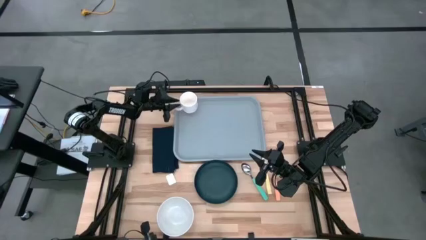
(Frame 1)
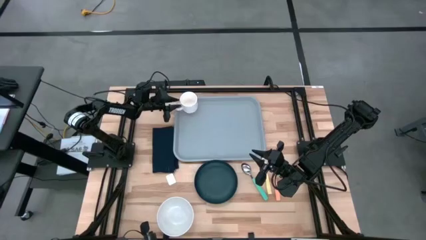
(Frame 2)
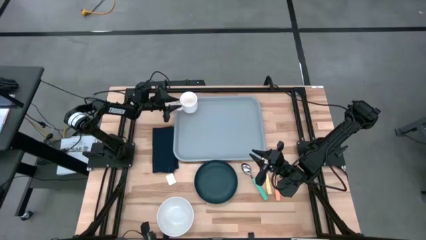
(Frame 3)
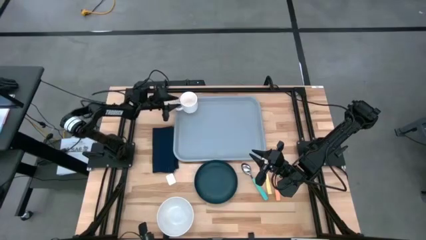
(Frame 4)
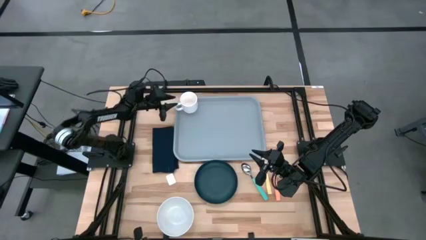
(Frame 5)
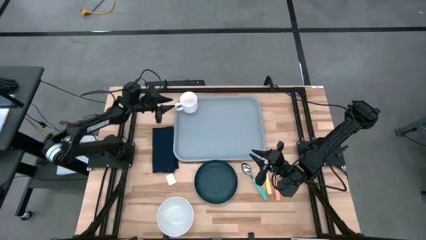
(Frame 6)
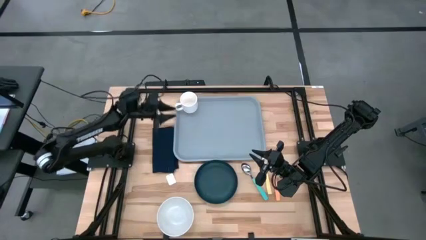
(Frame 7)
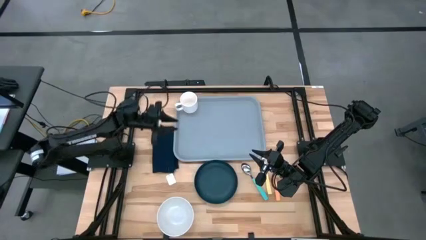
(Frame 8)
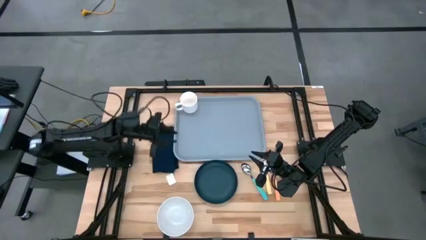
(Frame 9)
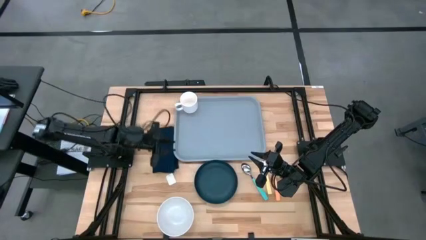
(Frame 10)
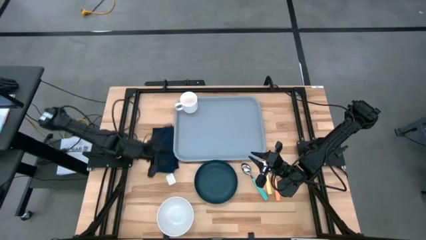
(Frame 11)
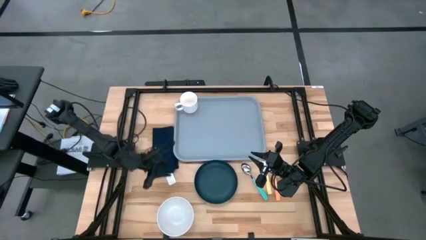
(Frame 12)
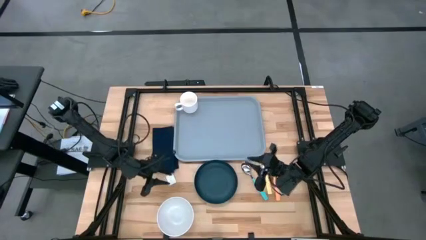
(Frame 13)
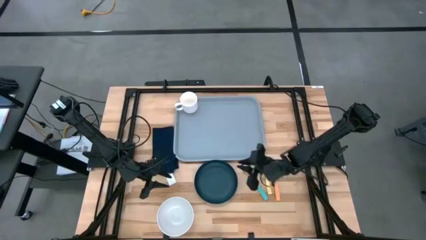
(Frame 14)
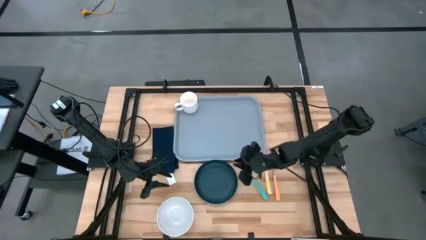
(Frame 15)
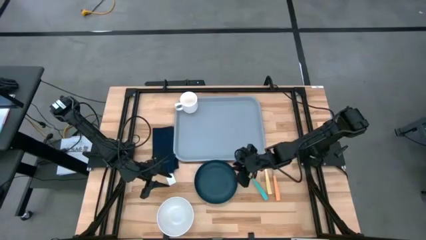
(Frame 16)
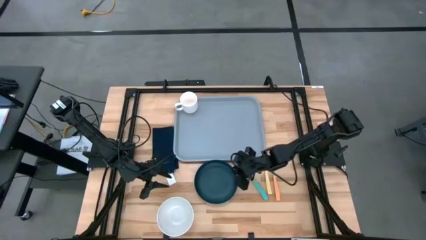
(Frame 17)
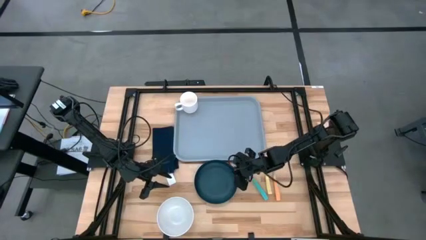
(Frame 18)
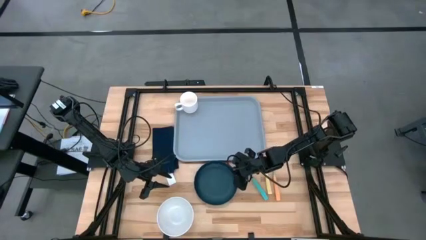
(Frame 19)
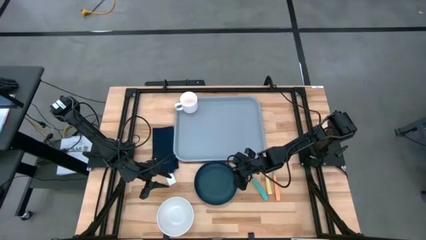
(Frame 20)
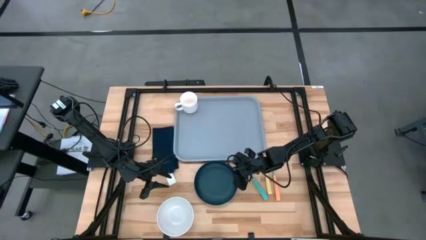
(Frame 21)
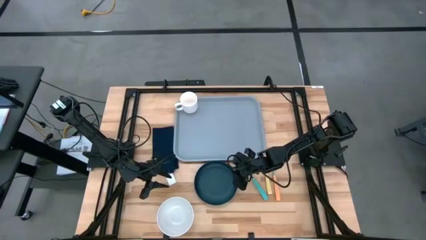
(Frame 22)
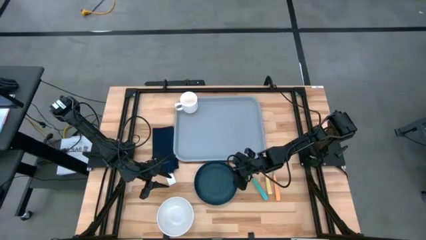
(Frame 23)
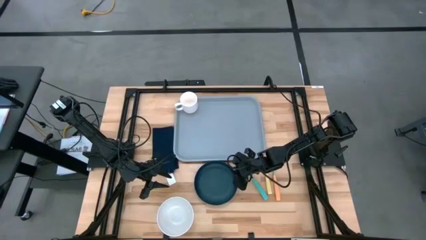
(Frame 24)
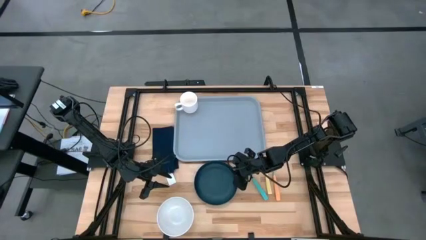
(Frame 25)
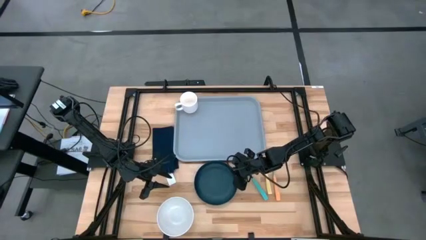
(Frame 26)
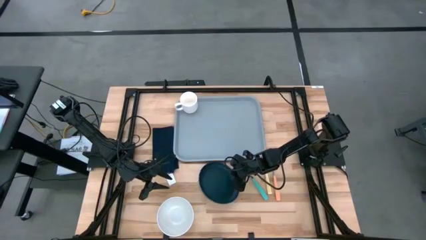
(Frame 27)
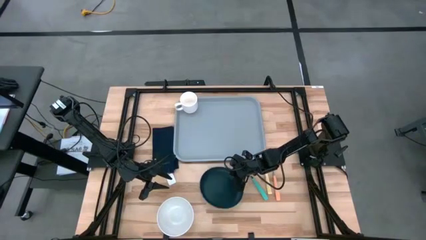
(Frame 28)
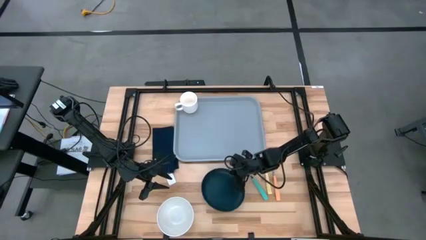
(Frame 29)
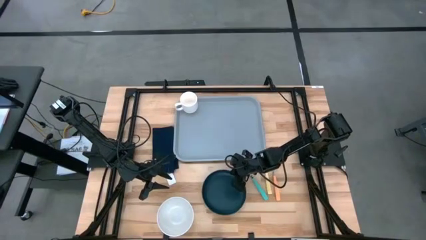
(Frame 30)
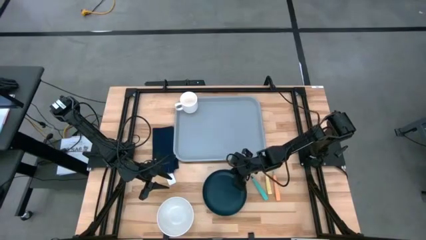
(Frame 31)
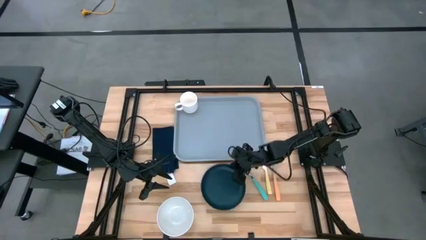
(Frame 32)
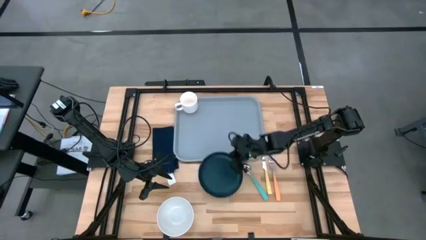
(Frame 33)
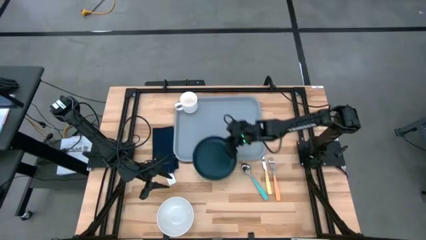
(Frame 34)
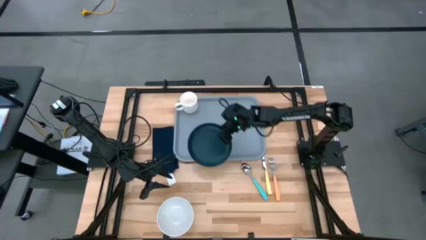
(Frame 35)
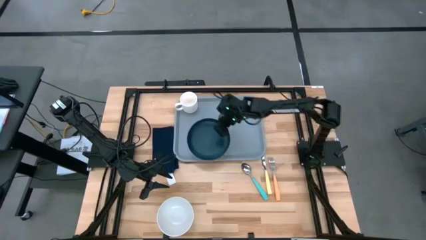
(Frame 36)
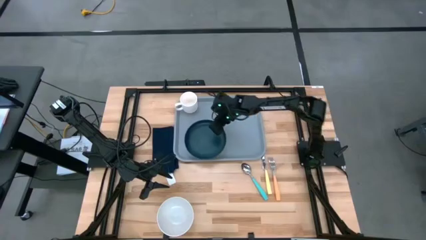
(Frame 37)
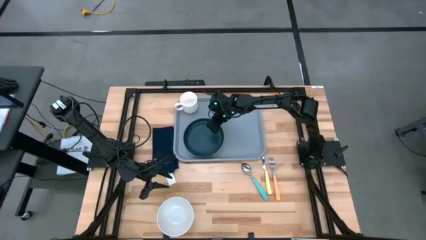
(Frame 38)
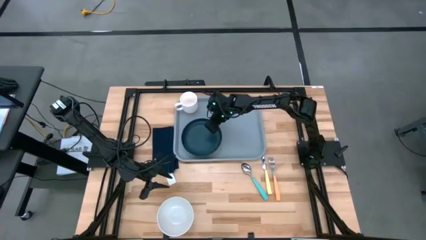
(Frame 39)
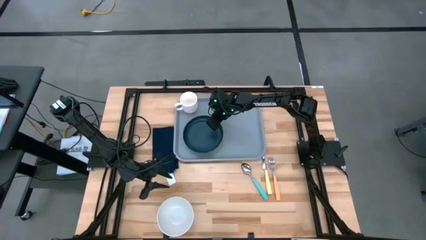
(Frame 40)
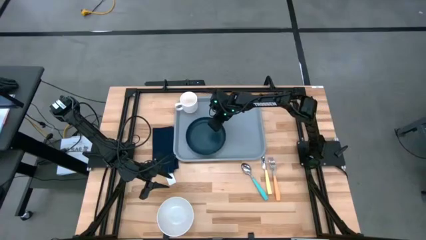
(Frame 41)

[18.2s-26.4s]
Task: Set up tray
Put the black plate on the gray serving tray to the bottom right of the white mug

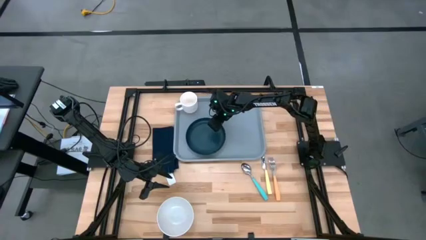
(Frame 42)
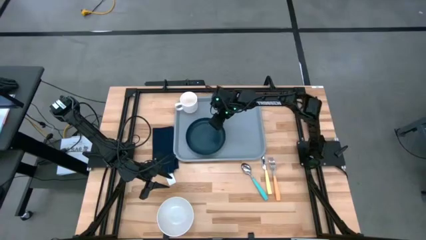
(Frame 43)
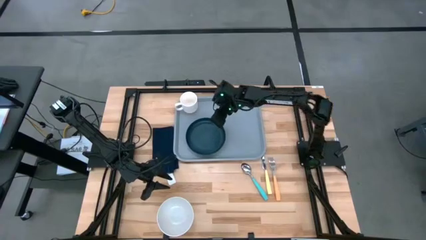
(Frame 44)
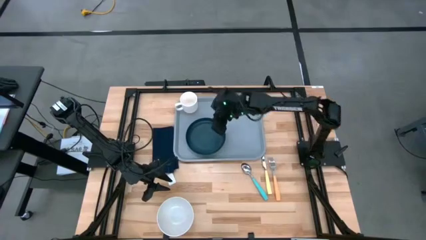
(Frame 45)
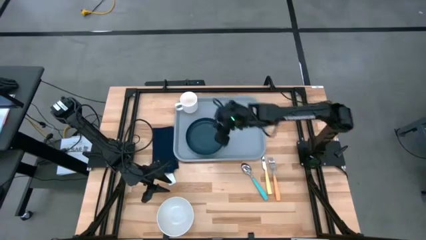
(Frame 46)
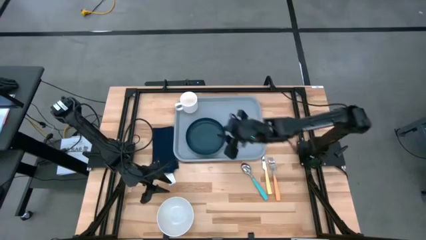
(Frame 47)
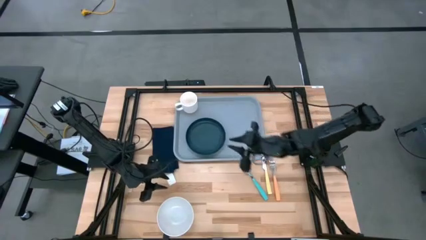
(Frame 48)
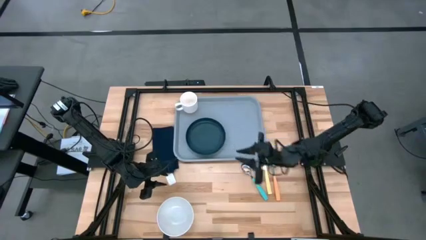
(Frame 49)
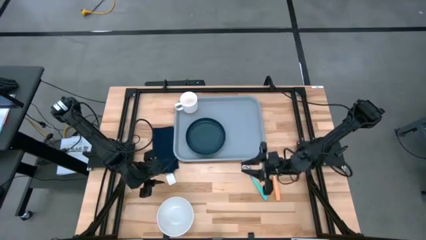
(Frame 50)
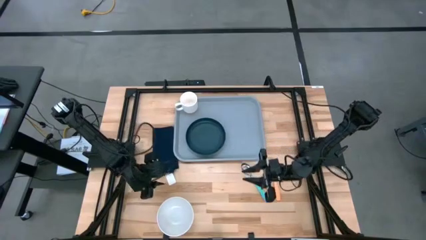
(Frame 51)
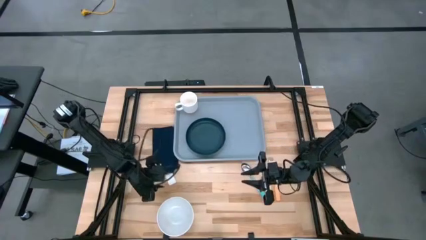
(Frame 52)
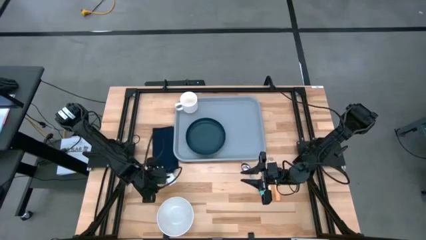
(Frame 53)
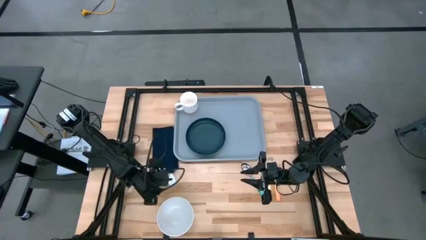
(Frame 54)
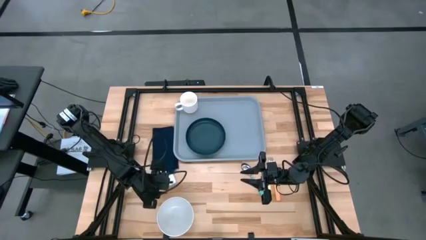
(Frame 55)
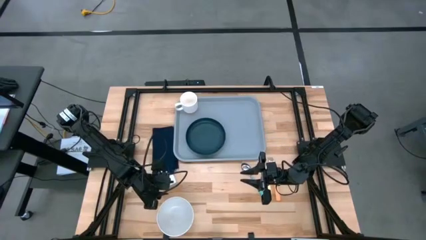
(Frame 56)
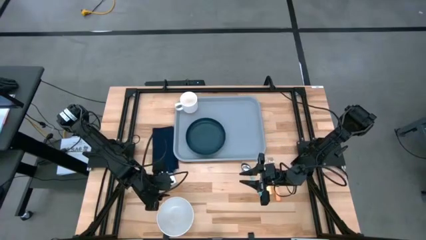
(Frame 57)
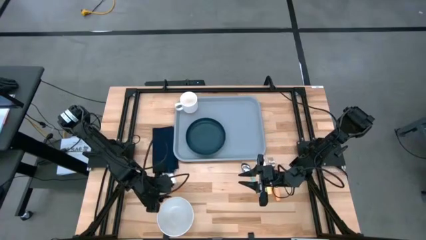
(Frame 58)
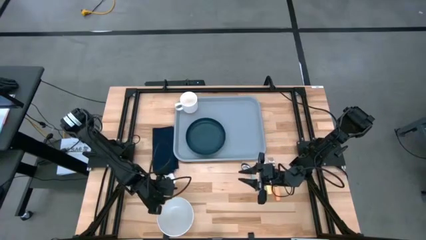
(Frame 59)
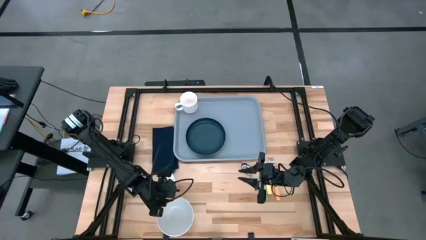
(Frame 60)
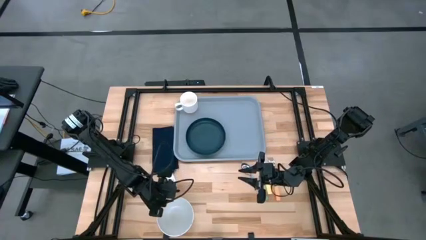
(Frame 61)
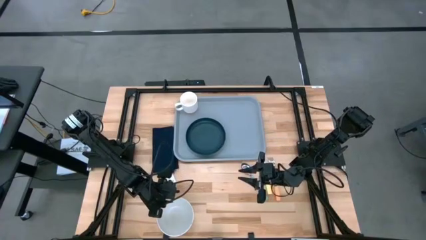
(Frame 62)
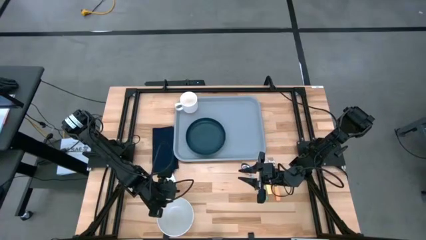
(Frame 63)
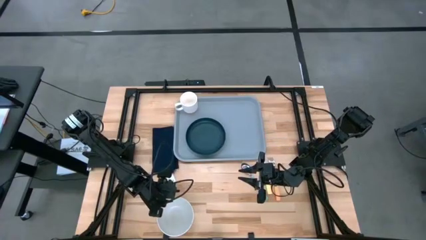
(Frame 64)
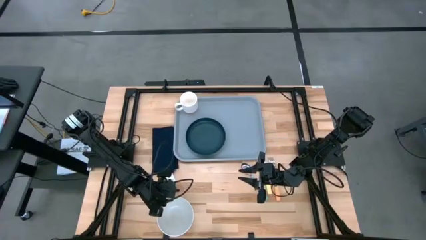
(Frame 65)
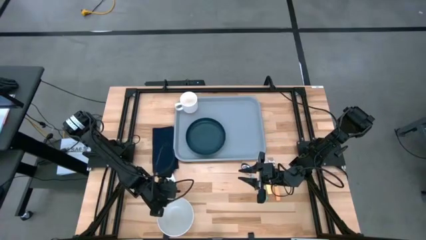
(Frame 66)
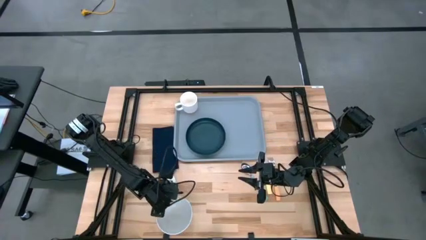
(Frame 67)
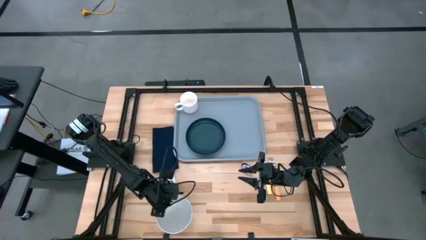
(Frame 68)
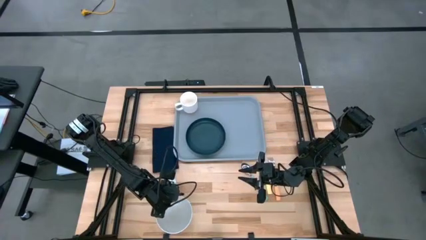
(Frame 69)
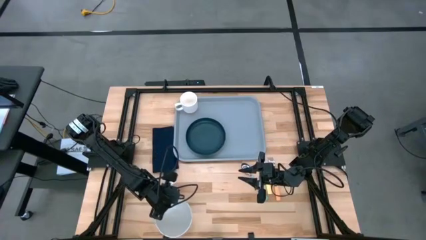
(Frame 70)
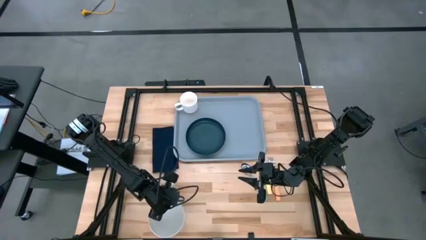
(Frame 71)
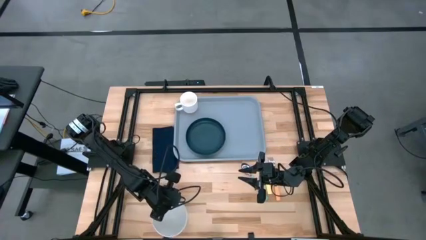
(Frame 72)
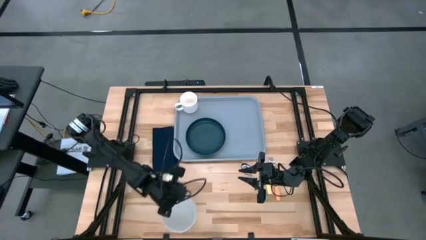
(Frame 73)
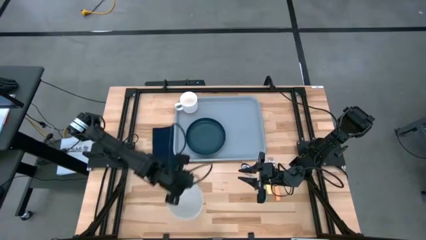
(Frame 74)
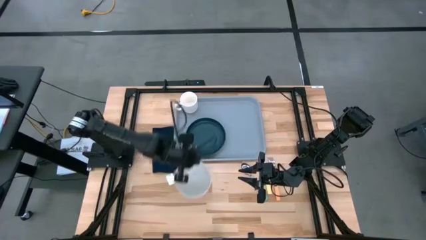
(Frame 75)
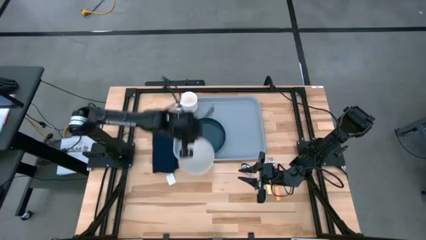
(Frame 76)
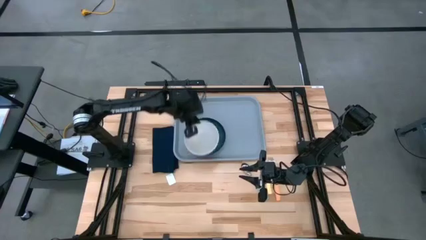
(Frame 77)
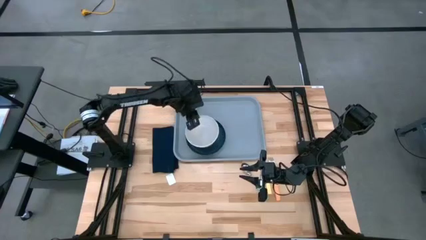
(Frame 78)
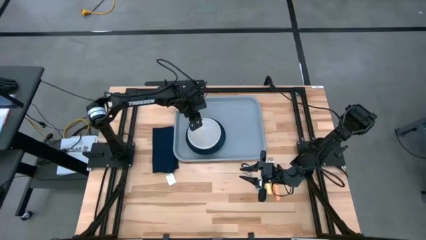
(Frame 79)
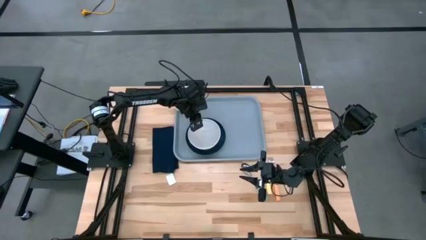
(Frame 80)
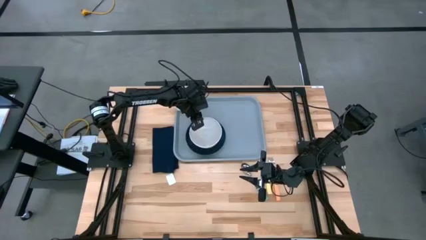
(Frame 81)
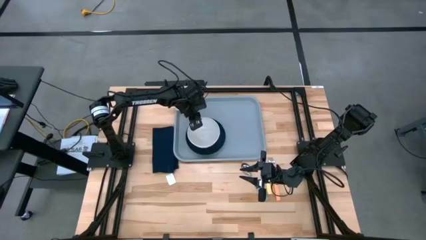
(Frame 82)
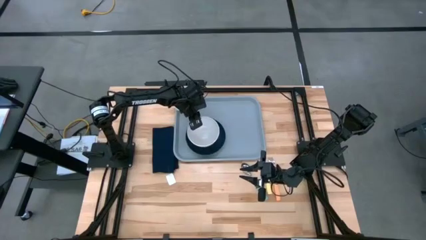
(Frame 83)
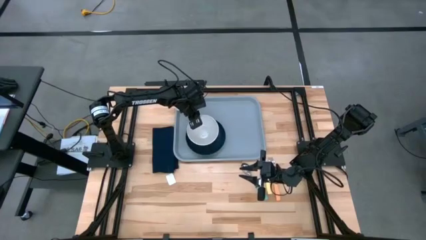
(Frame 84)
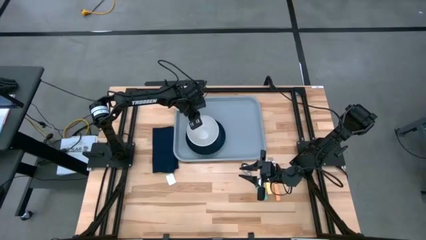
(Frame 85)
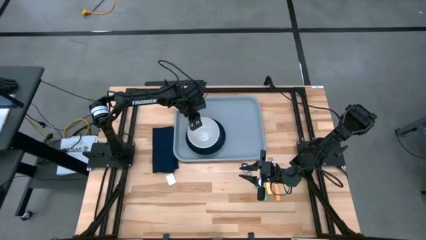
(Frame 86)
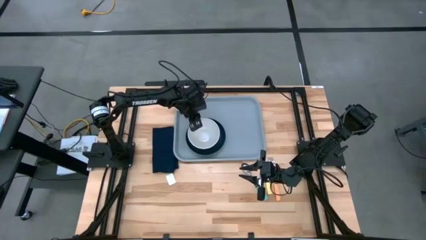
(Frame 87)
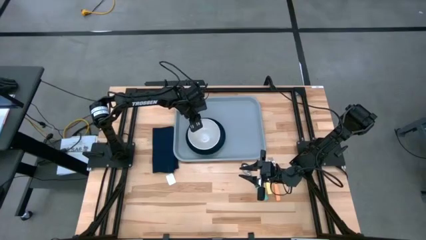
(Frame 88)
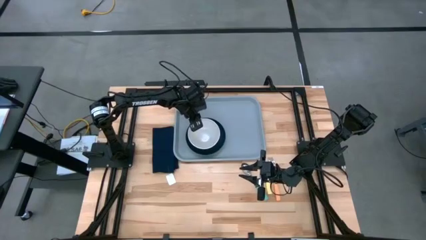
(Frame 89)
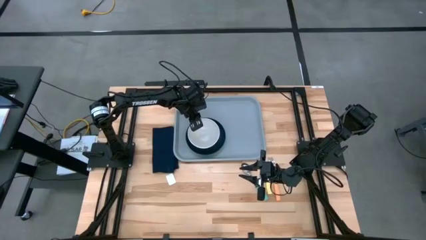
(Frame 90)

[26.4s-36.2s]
Put the white bowl on the black plate
